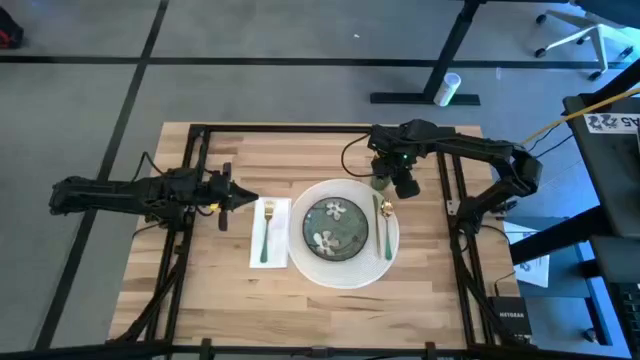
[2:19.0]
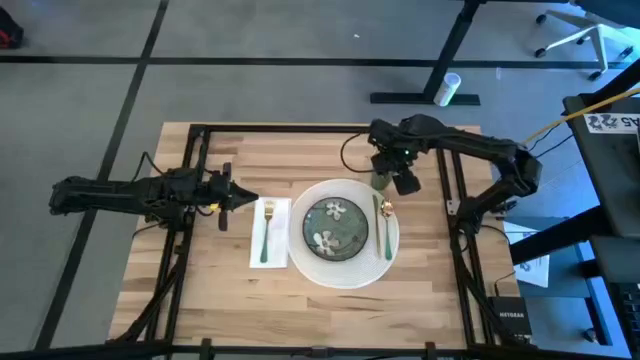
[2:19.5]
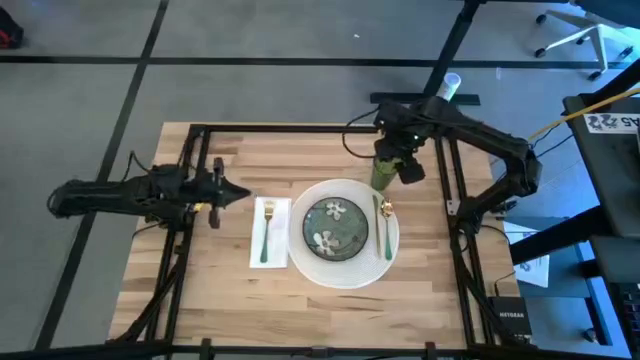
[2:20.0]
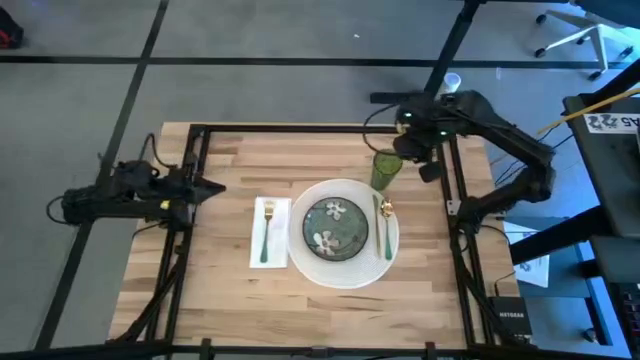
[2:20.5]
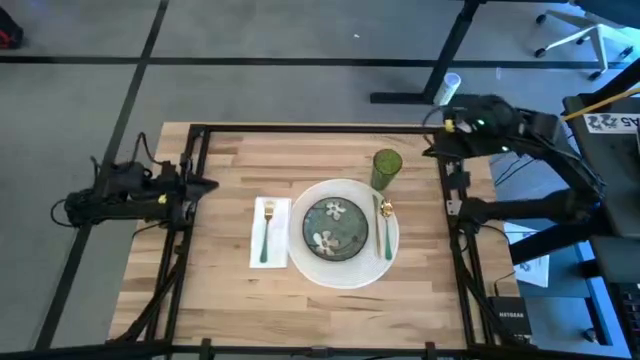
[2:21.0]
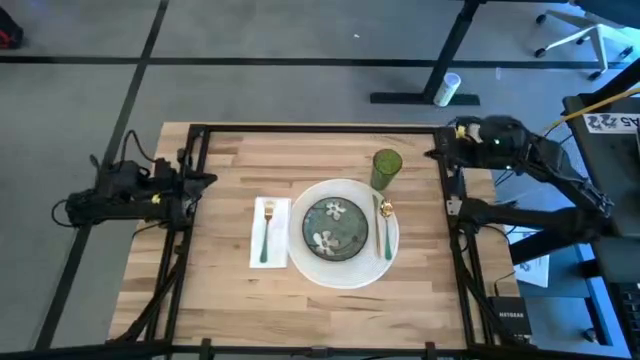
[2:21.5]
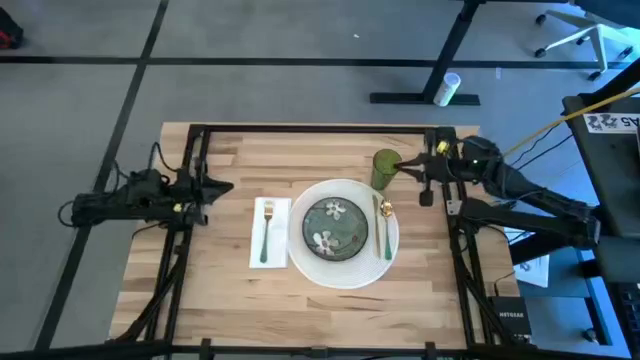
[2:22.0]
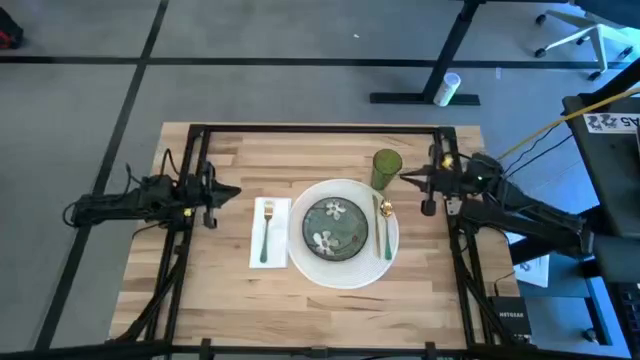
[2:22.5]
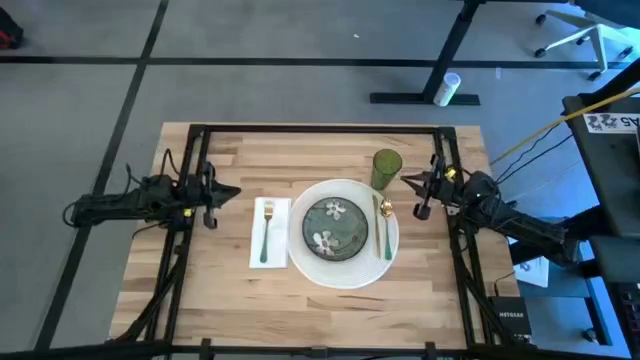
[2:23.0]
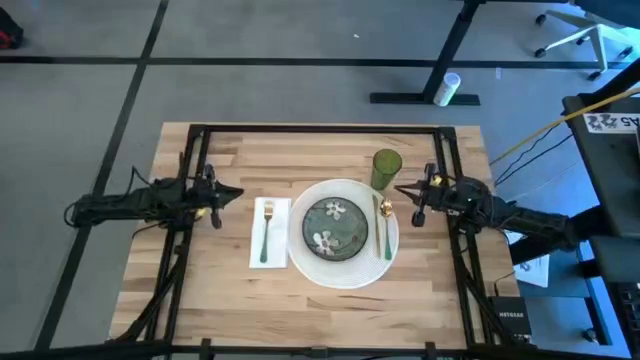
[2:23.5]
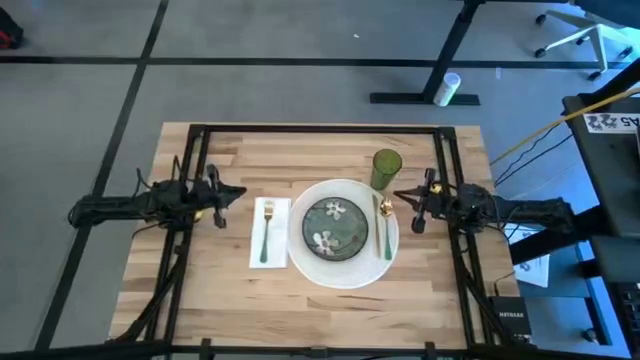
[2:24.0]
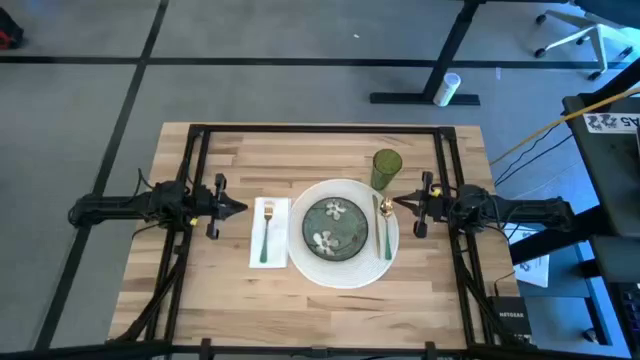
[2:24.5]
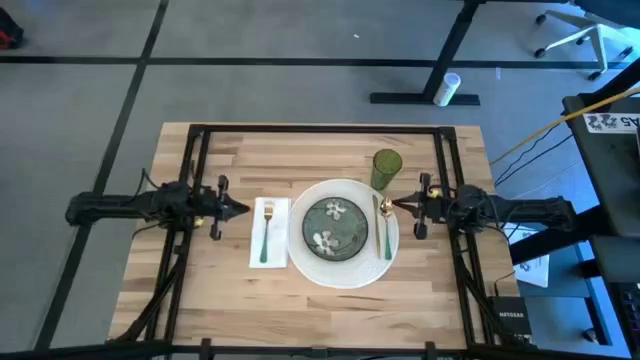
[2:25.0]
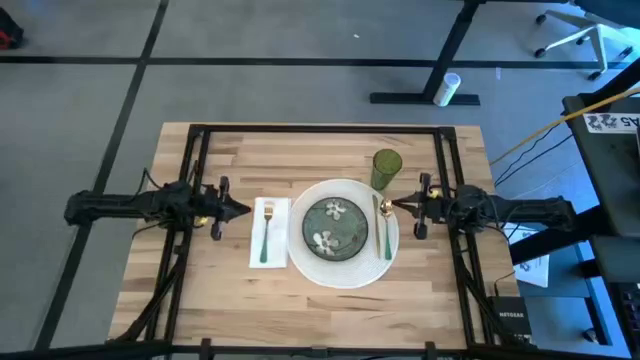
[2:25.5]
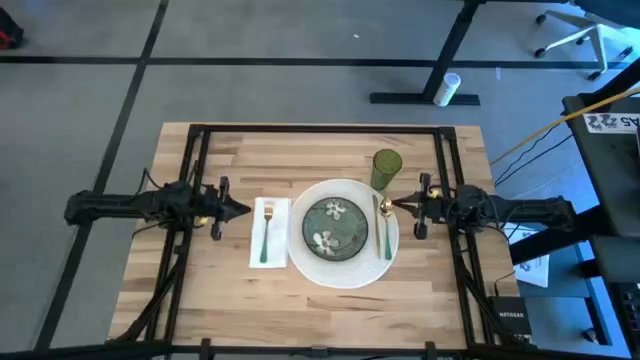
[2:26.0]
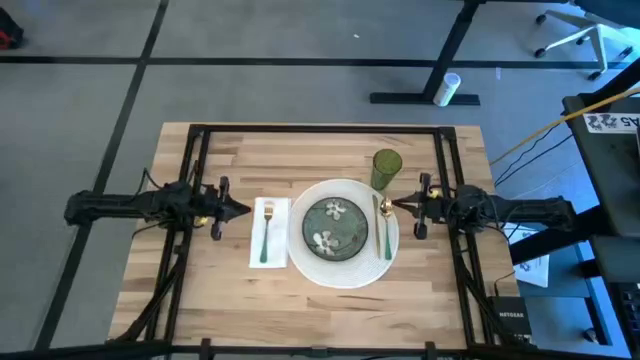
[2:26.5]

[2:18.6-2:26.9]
Task: Set table place
Return to Home Position

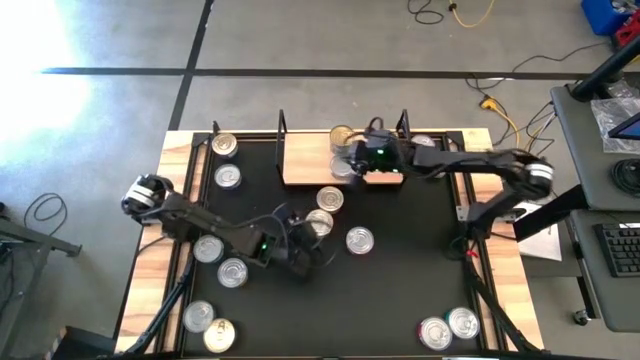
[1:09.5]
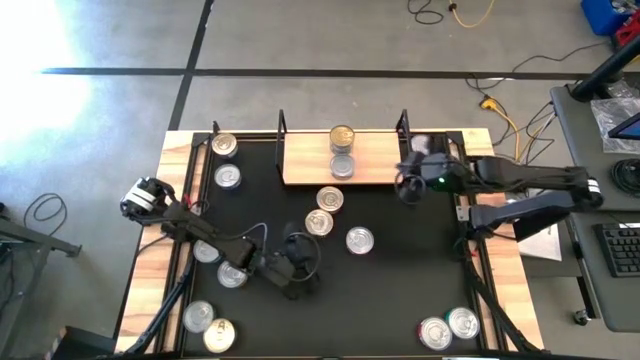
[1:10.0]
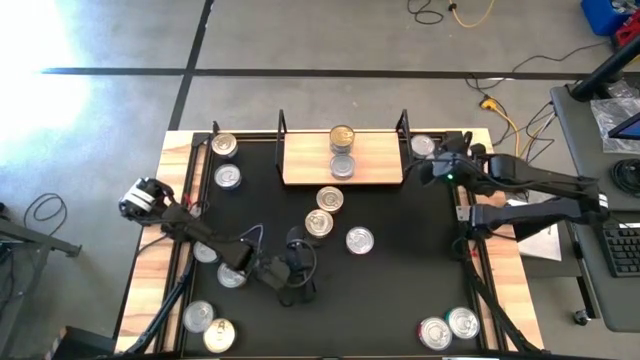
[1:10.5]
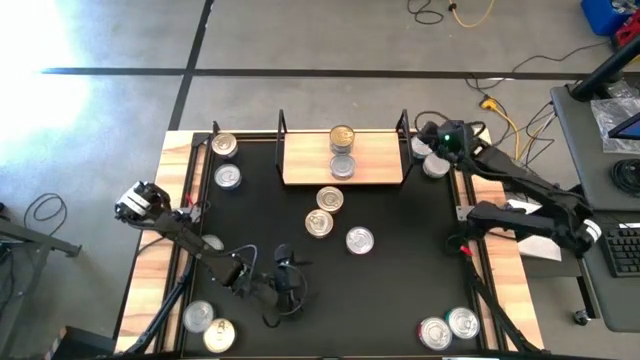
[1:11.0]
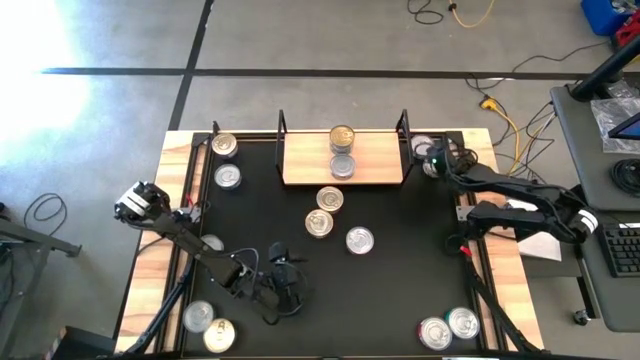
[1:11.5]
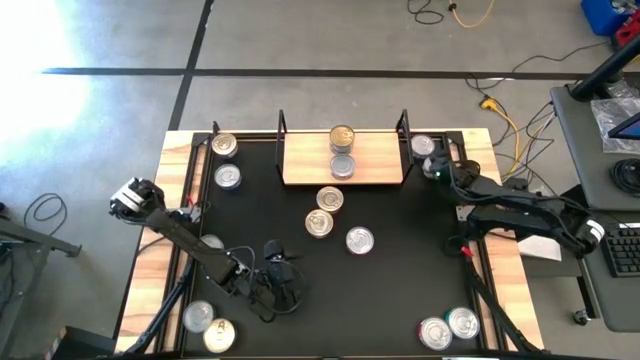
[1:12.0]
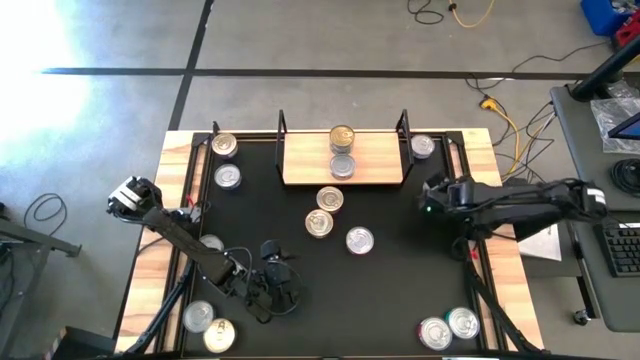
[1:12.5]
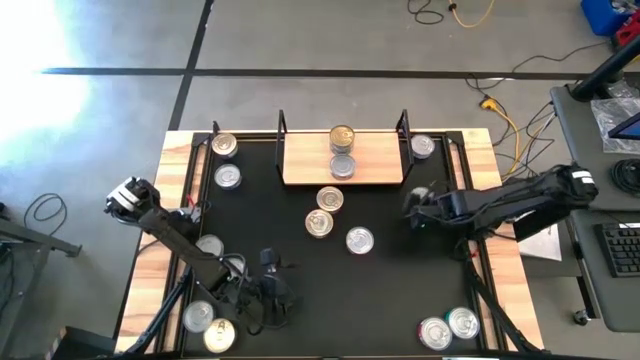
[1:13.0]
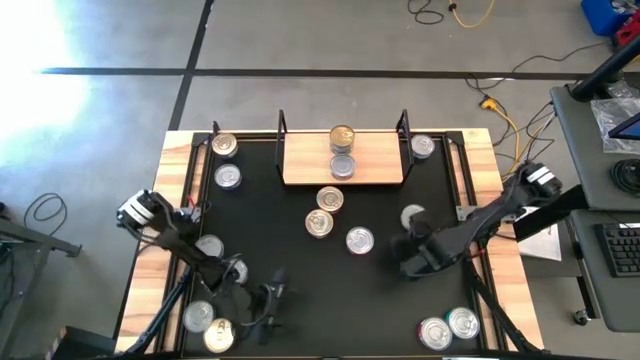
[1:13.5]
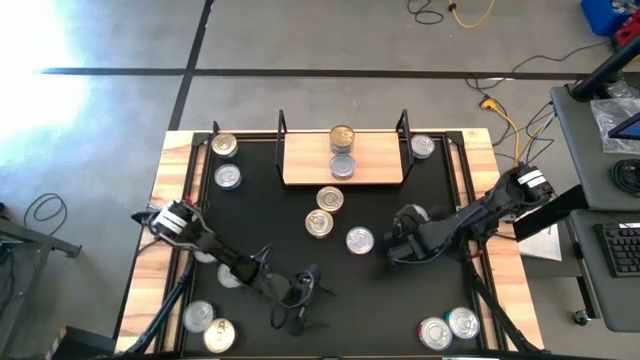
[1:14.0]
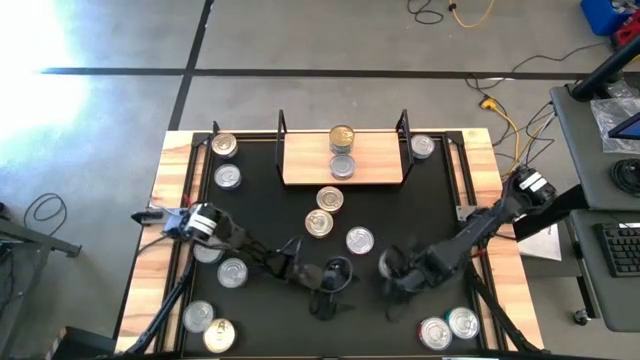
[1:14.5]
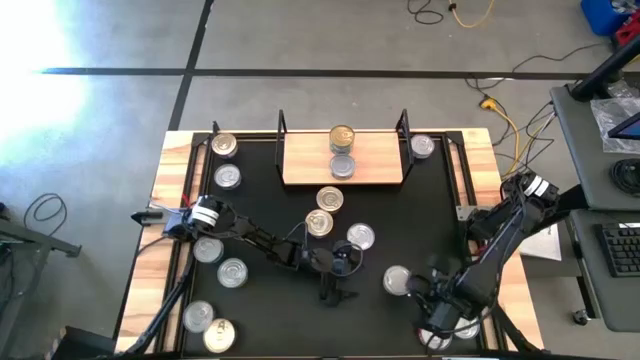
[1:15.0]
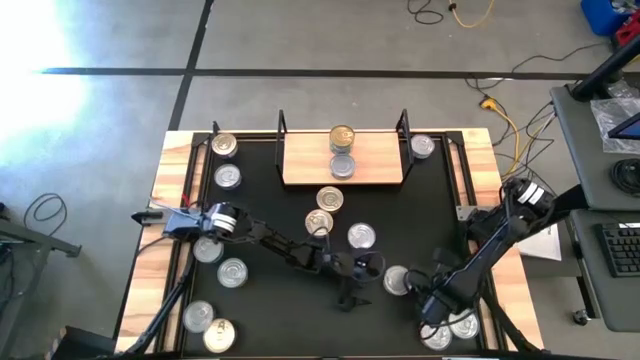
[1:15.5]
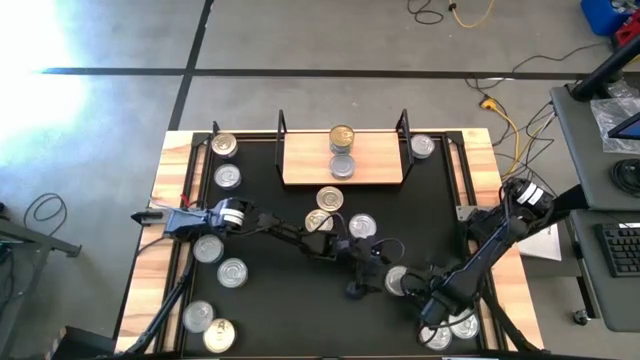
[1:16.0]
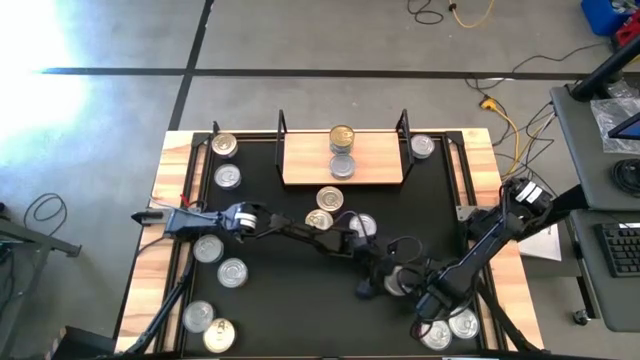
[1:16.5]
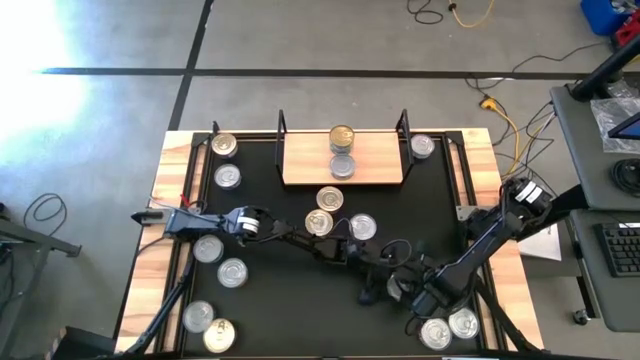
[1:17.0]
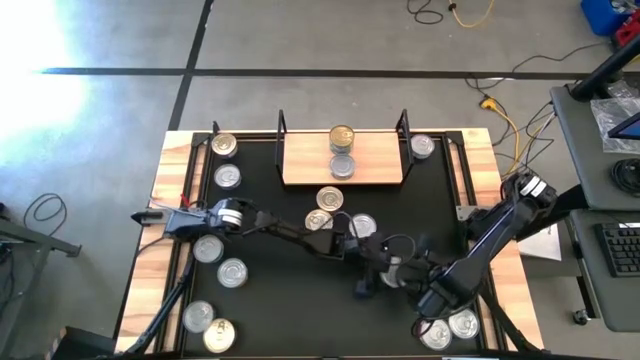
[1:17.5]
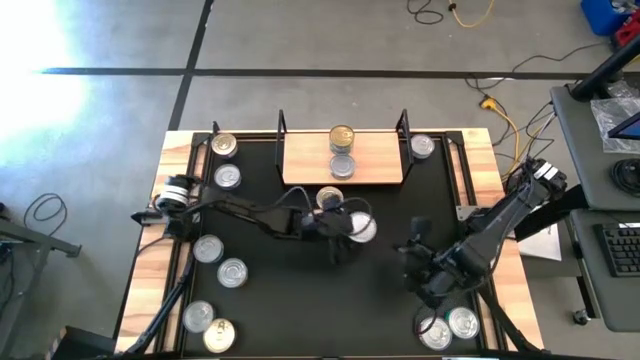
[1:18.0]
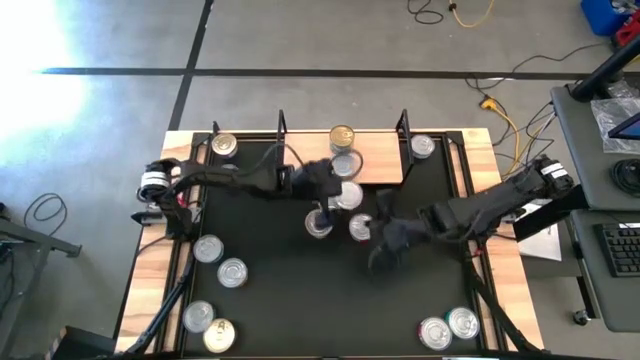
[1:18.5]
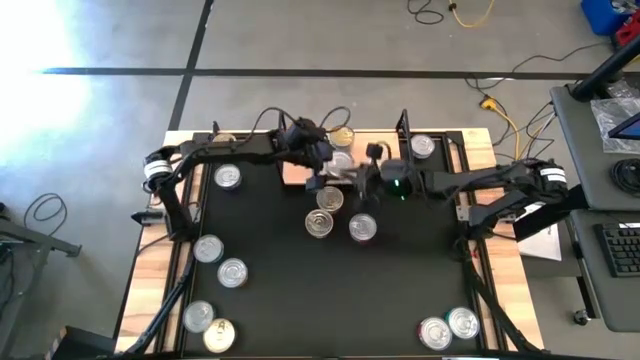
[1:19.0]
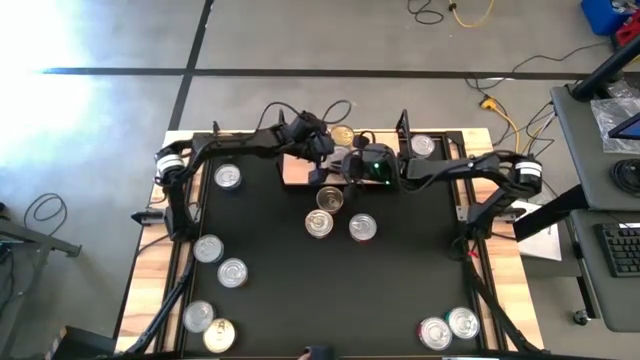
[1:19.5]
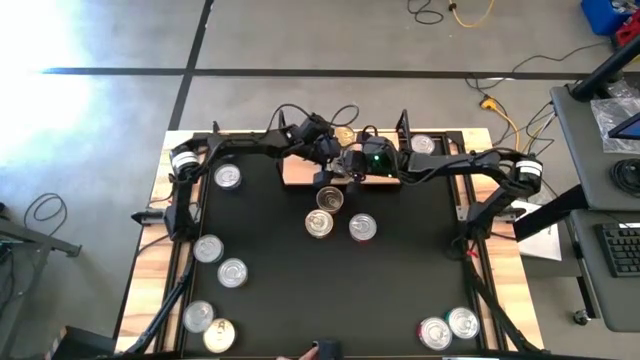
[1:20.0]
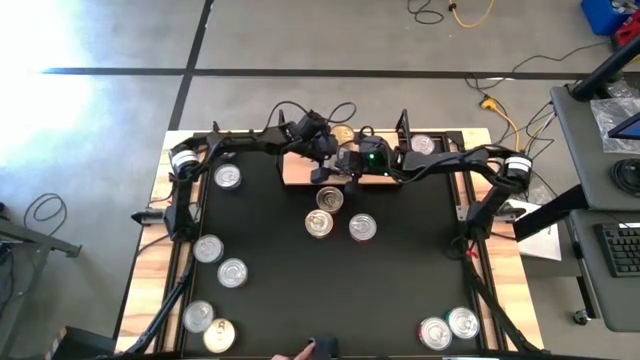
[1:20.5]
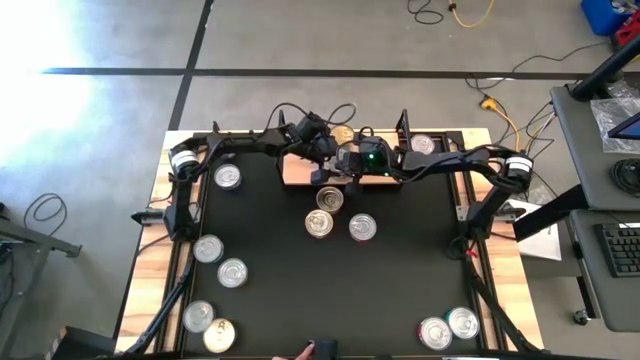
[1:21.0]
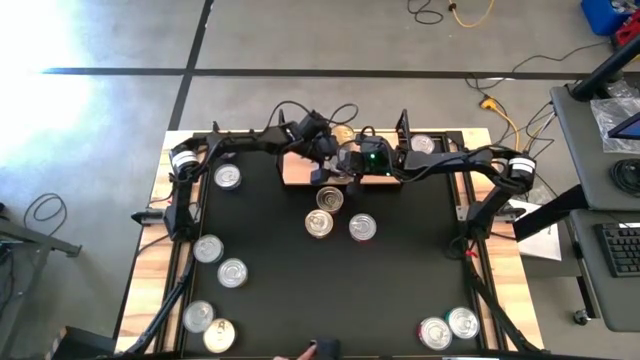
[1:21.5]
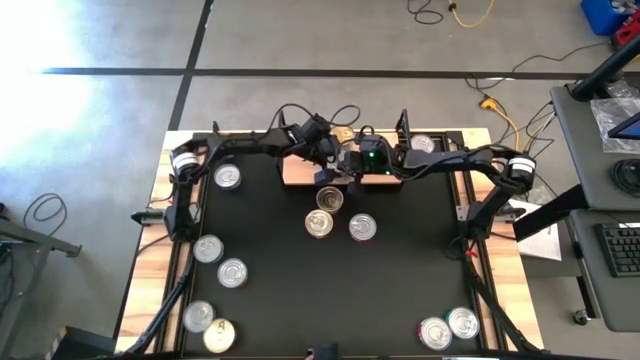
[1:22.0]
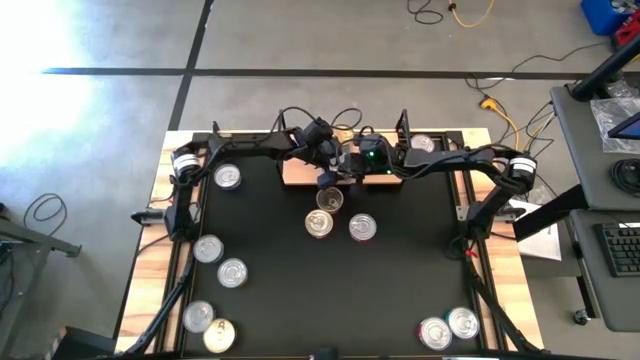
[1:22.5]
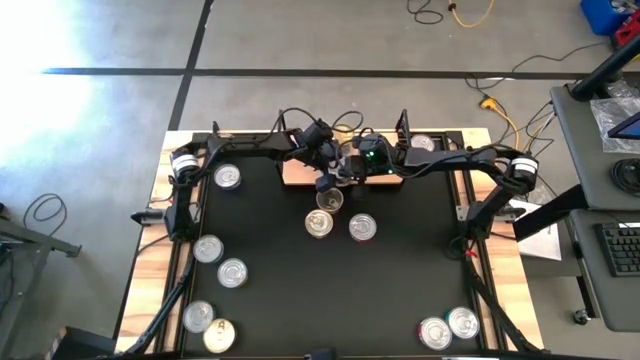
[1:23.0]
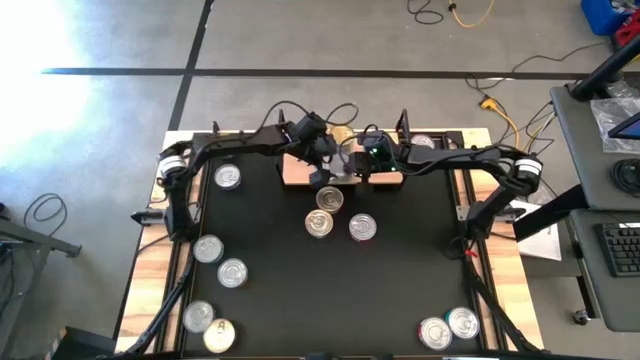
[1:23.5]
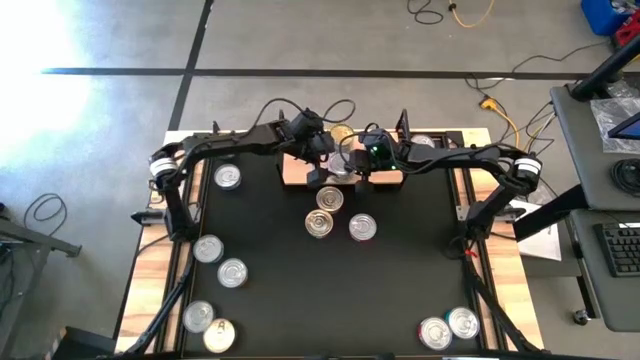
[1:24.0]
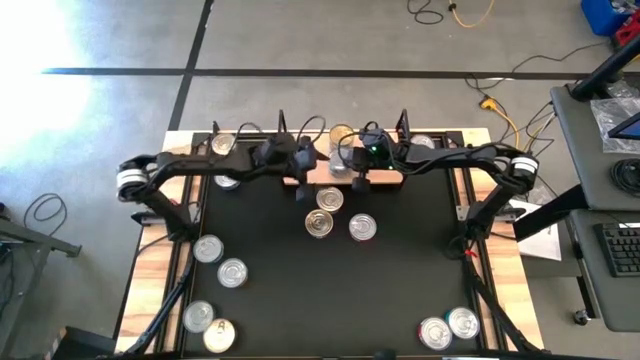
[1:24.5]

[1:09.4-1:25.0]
Task: Stack canned seafood by type on shelf
Stack the green tuna can on the shelf aligned with the other green tuna can
